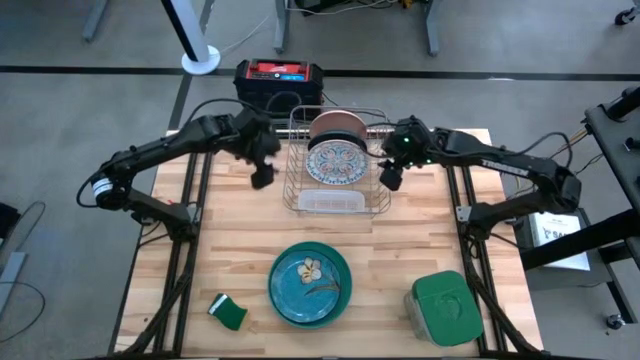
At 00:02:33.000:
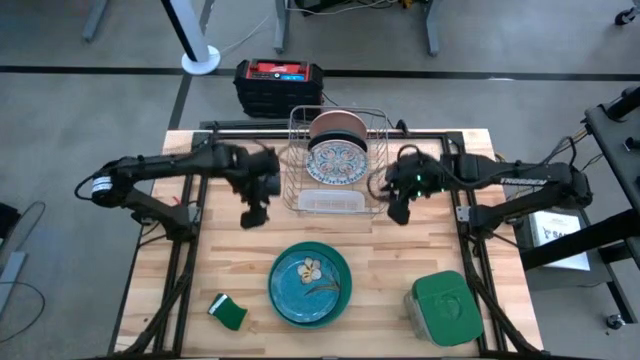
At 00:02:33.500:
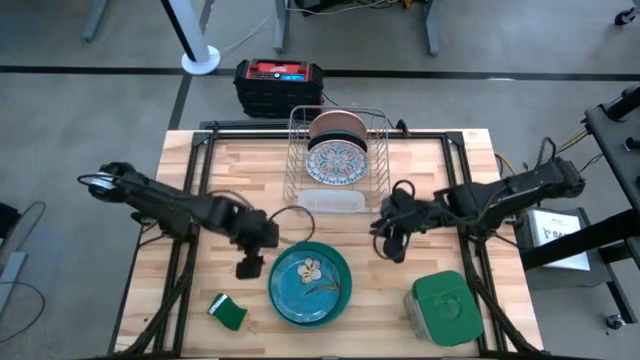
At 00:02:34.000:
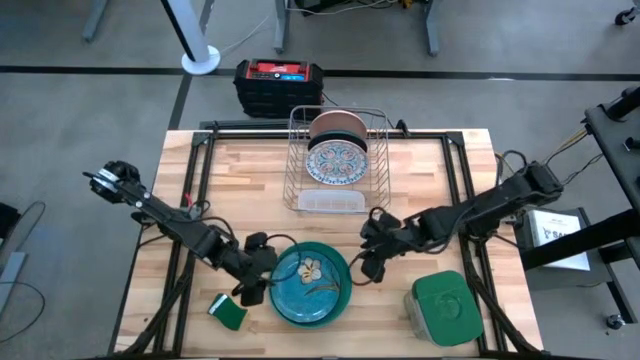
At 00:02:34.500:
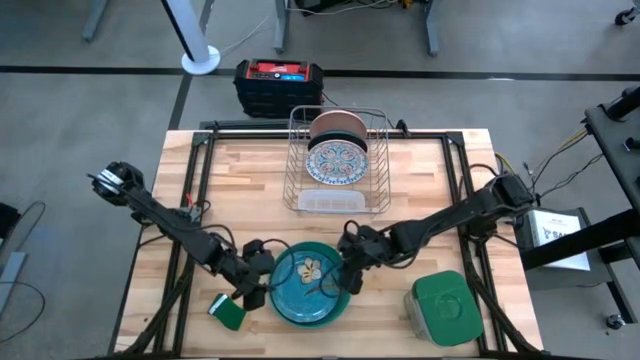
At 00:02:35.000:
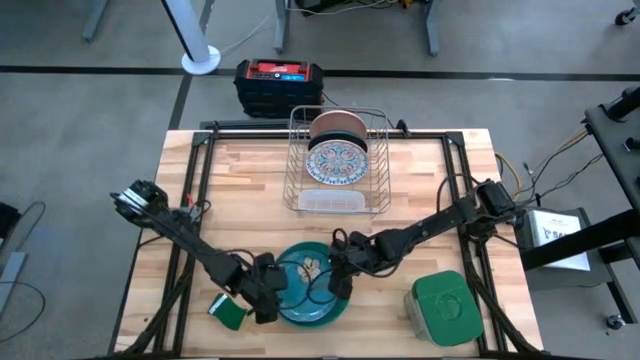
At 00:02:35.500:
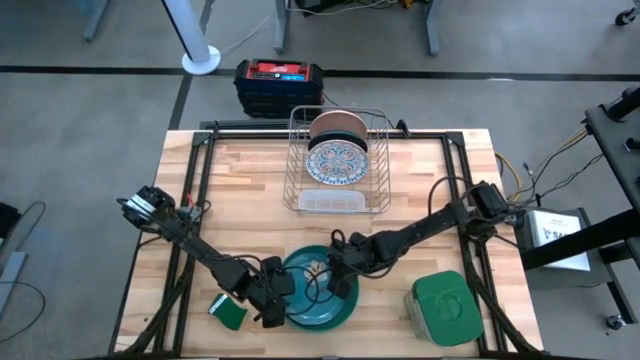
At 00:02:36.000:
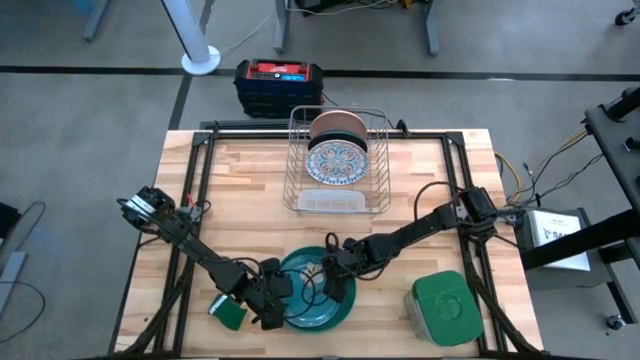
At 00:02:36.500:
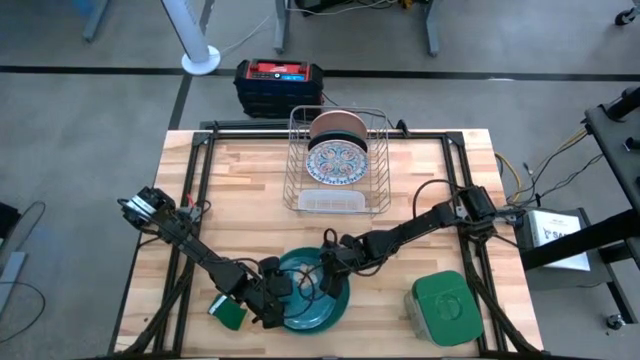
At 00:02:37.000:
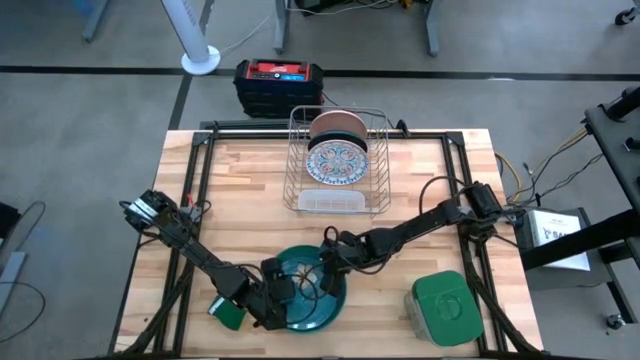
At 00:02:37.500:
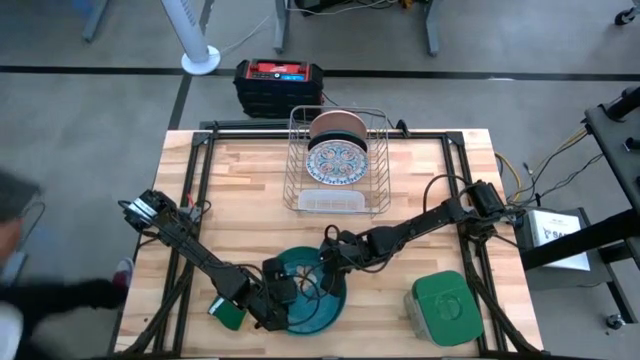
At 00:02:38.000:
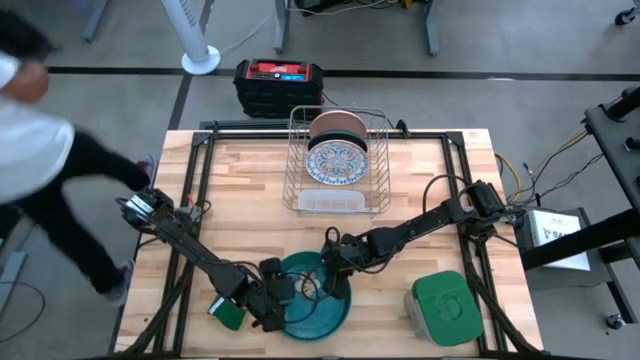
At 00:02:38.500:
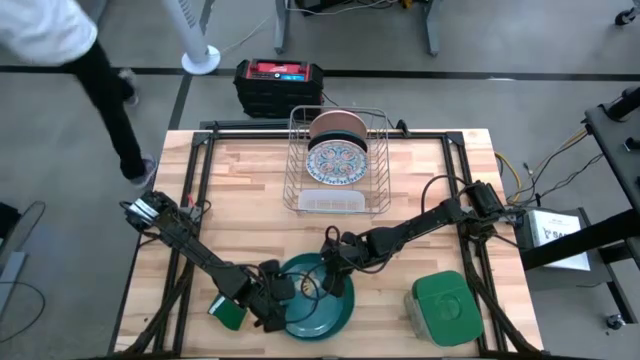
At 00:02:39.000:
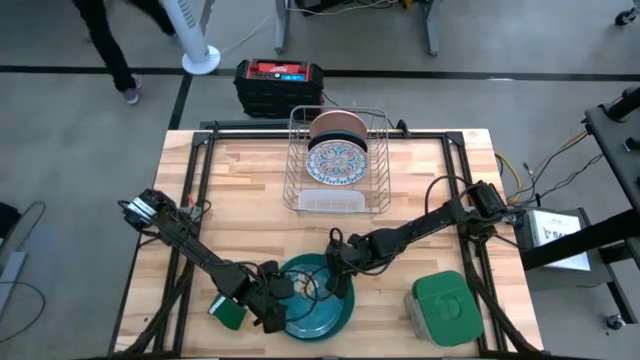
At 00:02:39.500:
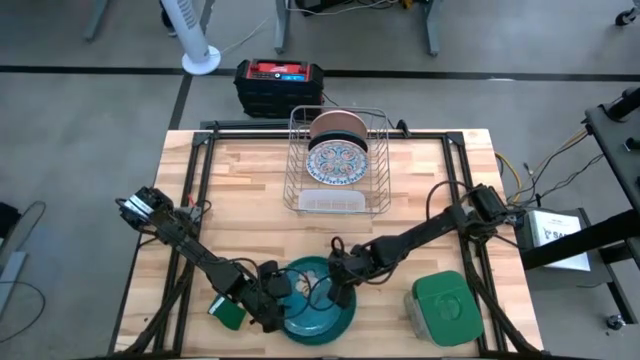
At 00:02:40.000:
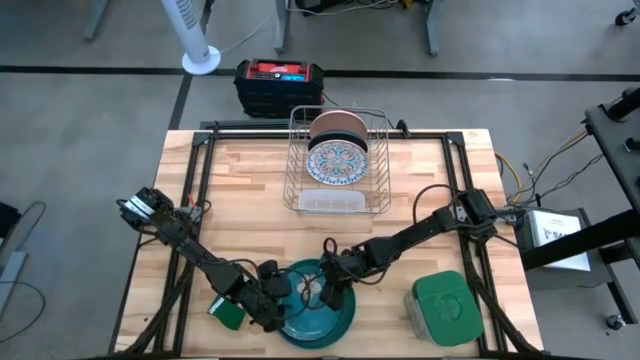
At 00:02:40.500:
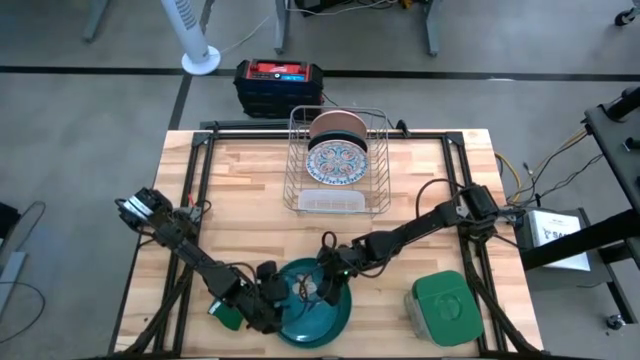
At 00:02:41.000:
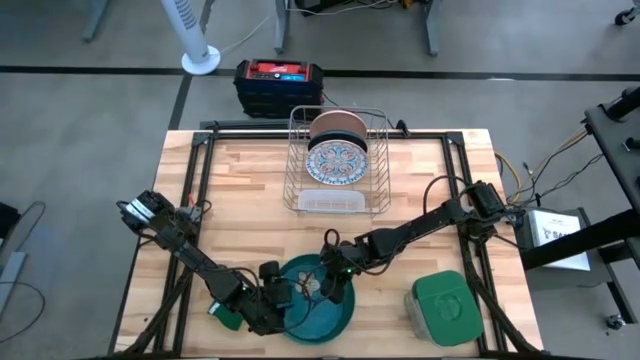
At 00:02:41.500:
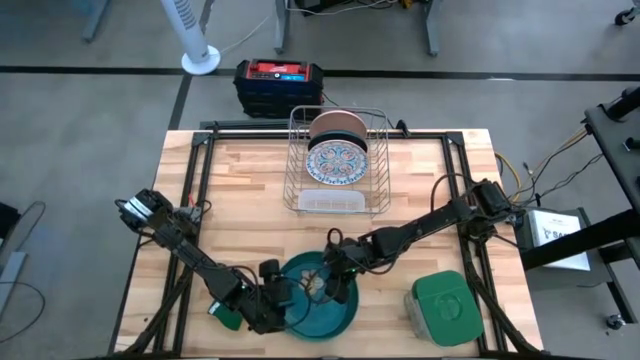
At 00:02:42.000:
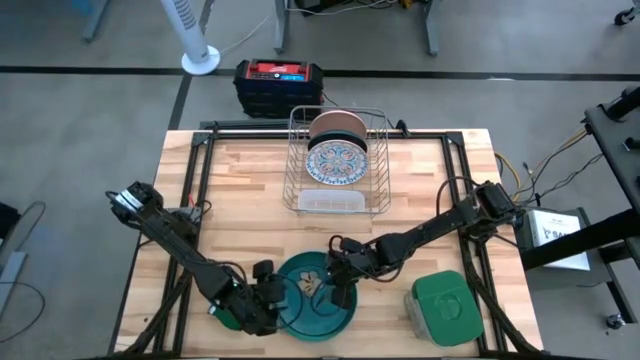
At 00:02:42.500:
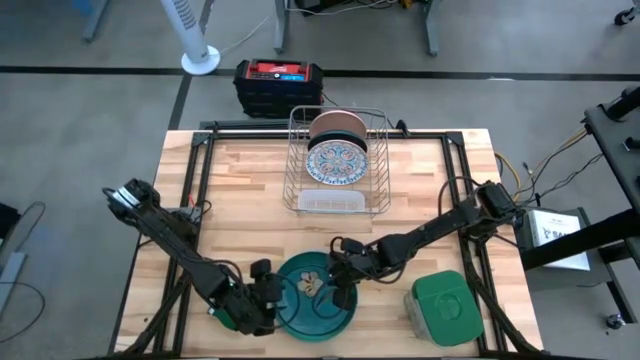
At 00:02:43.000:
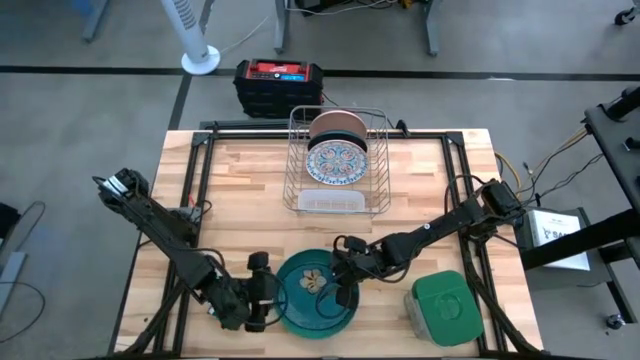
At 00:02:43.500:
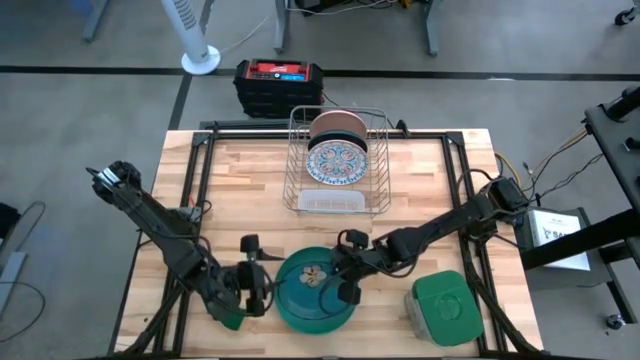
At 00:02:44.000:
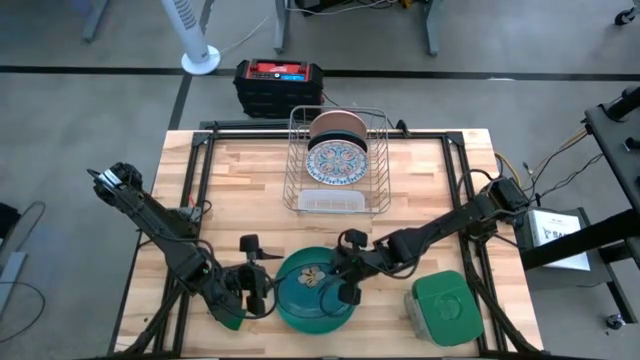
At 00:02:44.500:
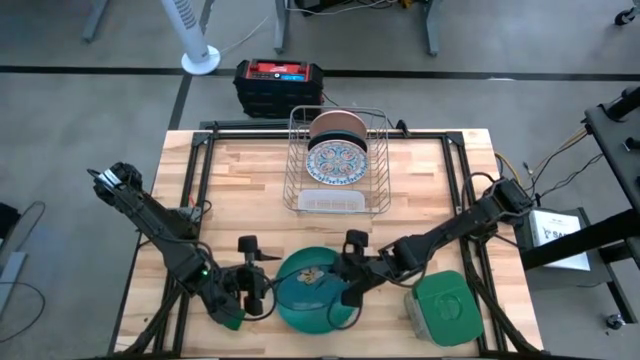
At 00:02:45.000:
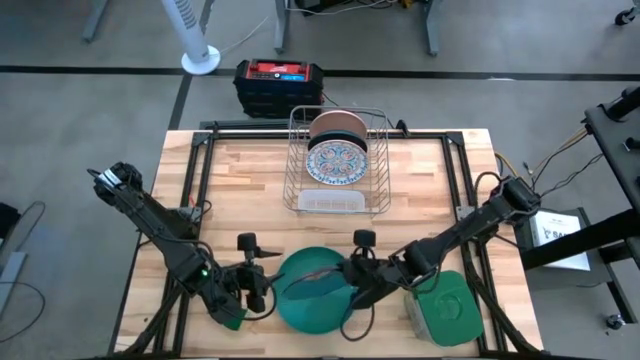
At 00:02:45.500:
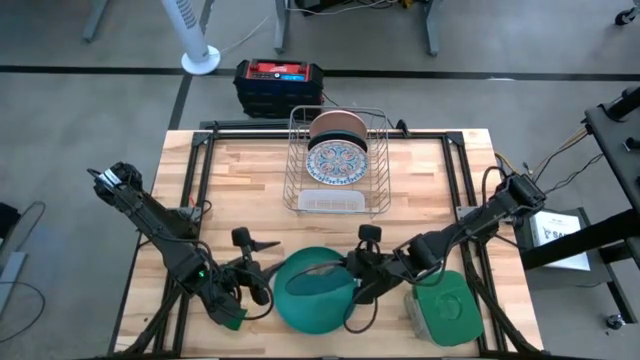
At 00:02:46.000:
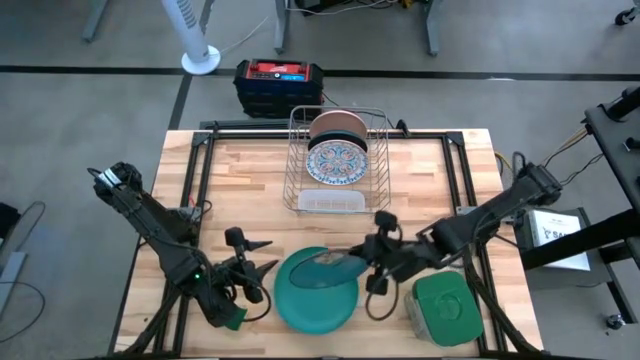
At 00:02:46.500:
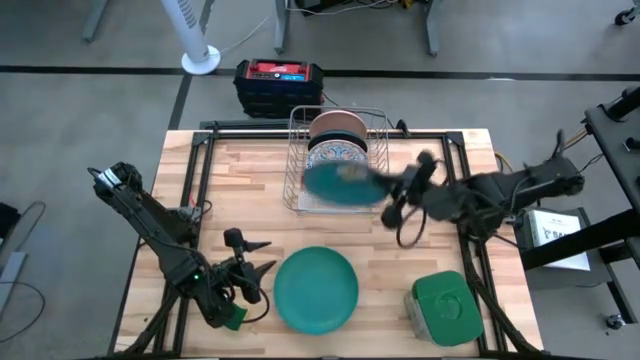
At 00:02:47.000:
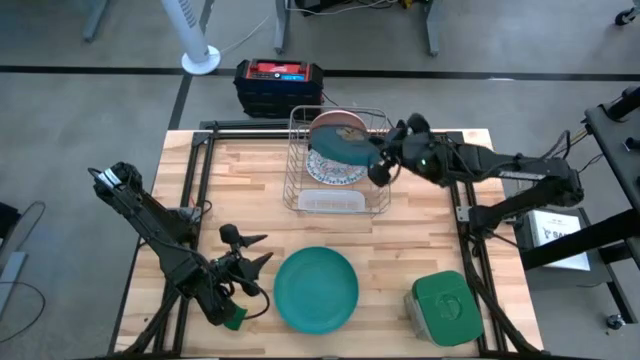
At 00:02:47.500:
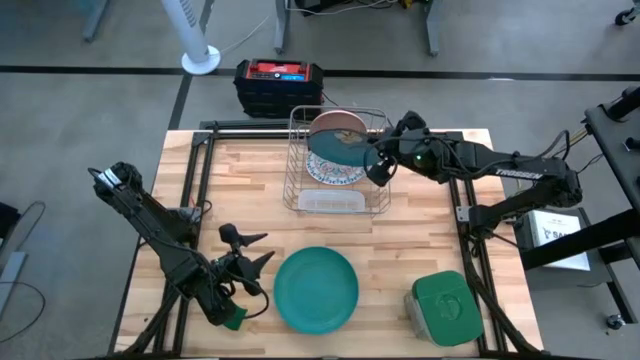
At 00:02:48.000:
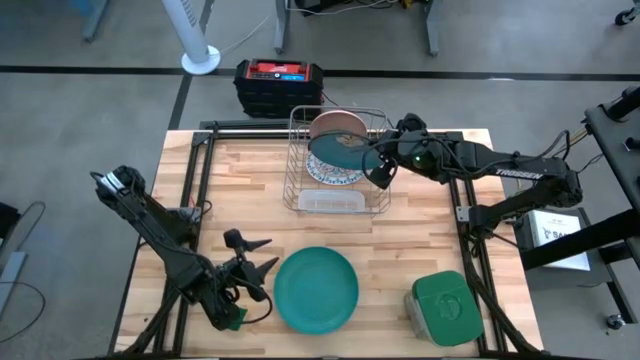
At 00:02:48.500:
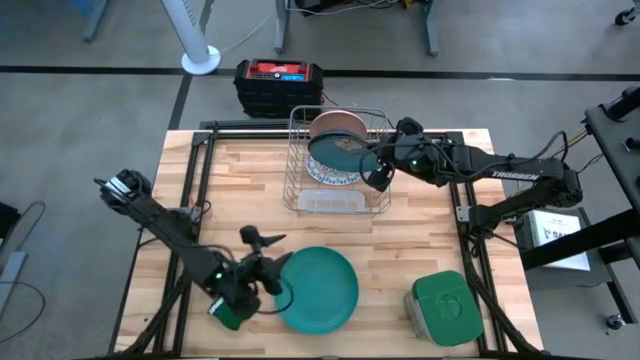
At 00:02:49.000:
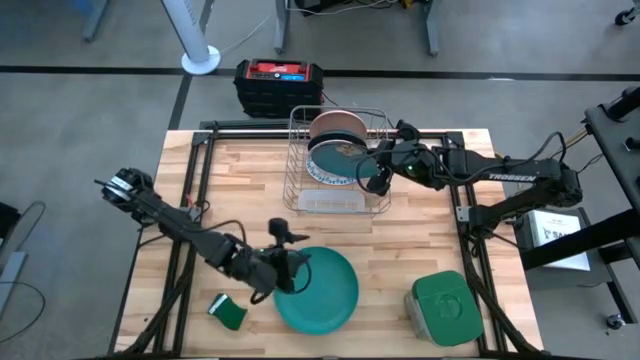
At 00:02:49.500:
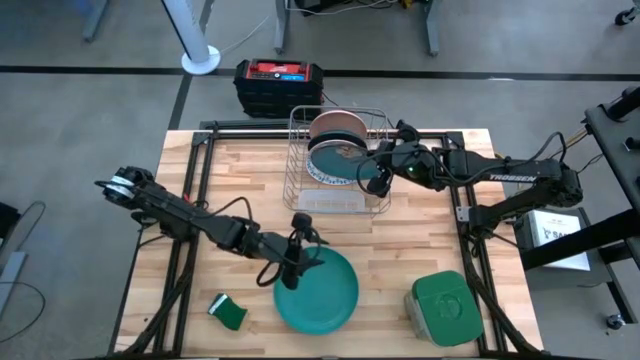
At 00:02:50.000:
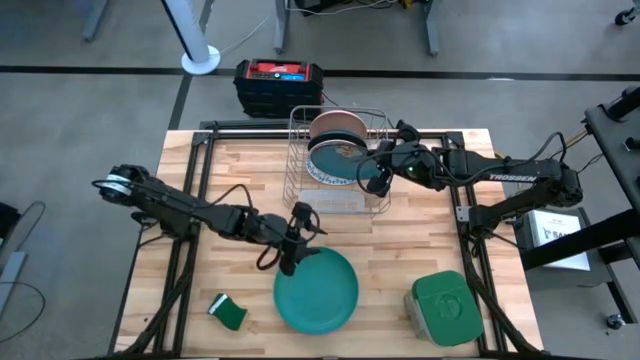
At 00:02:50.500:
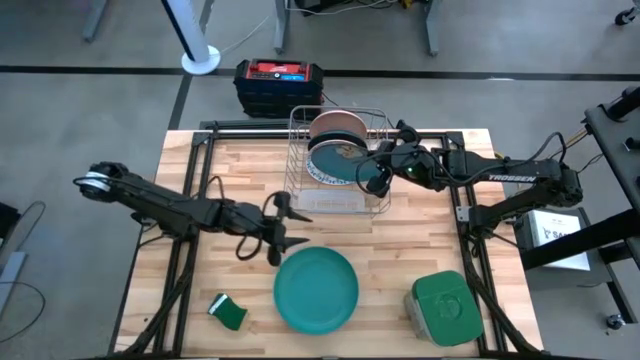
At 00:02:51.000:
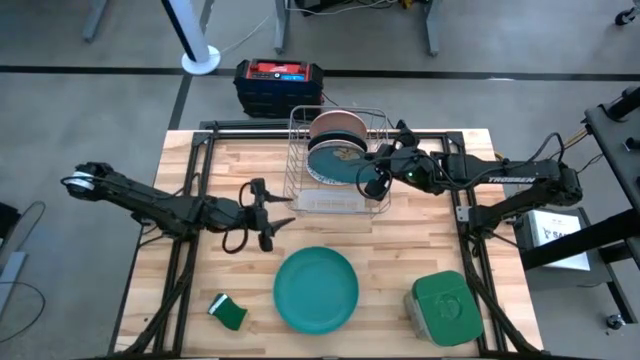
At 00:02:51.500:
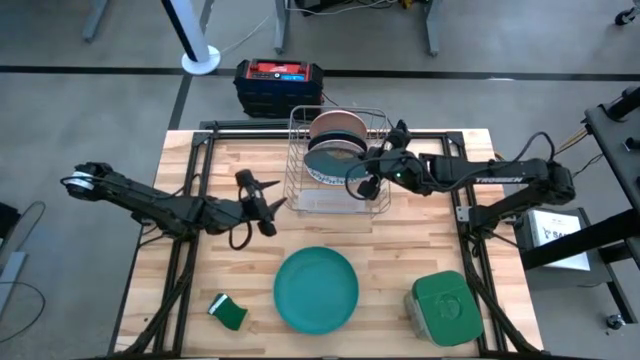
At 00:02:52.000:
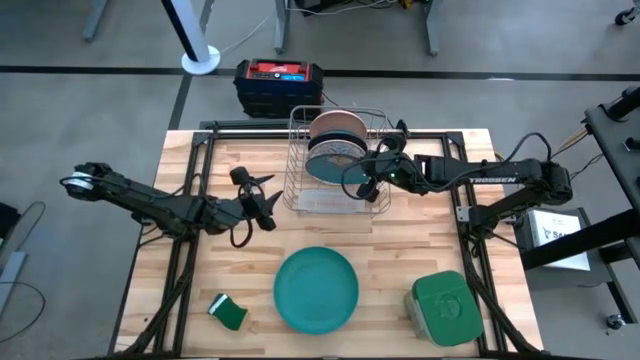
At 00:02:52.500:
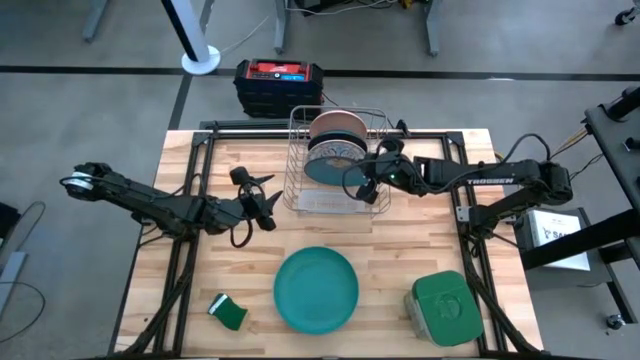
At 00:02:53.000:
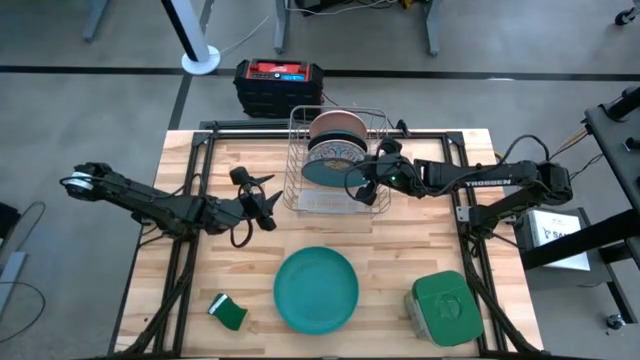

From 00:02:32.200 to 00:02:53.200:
Task: Sort dishes
Put the blue plate in the dishwasher rack

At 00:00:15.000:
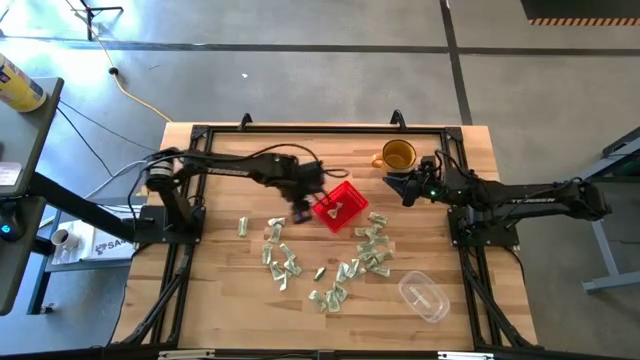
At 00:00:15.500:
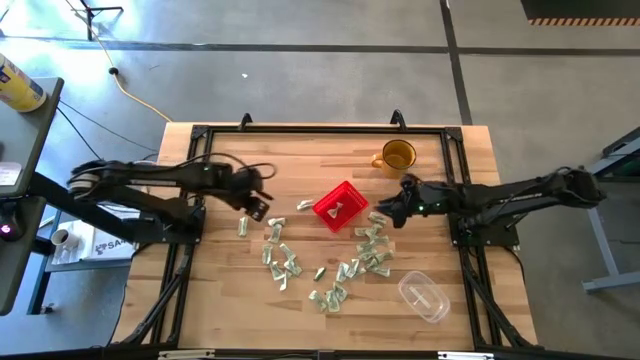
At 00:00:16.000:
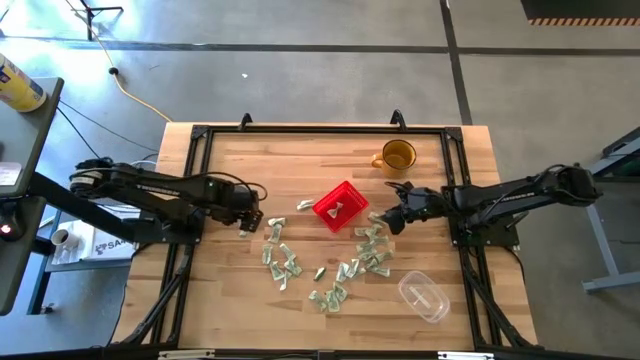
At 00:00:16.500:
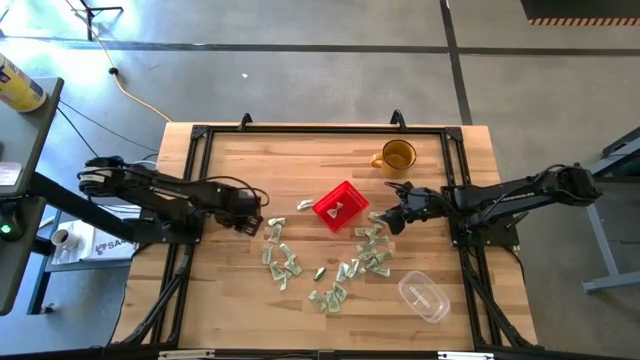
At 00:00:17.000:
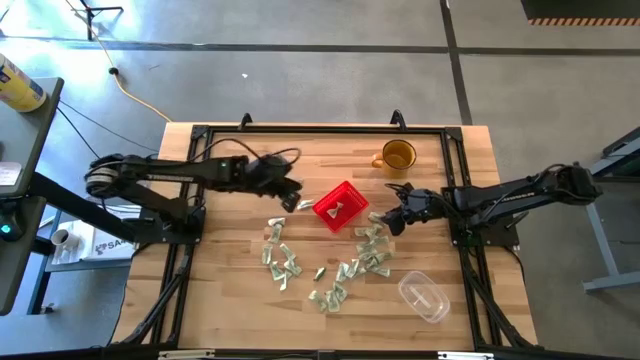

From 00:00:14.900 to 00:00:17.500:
Task: Pick and place items into bin
Put the white stevia packet into the red bin
